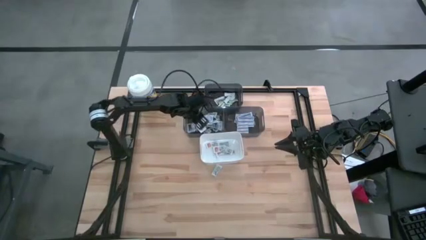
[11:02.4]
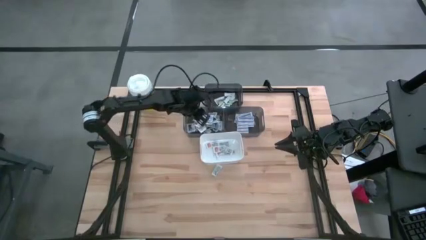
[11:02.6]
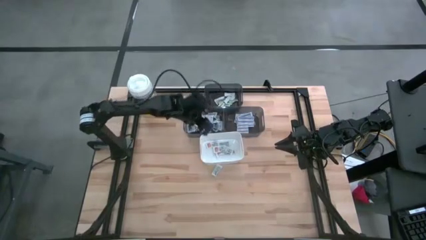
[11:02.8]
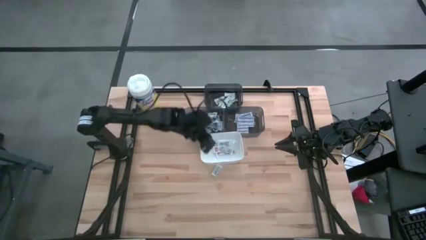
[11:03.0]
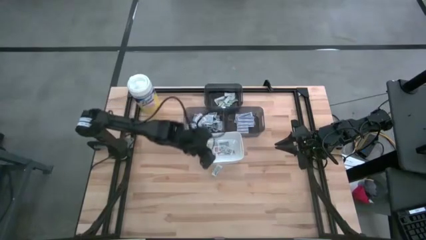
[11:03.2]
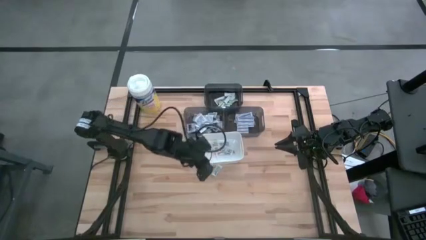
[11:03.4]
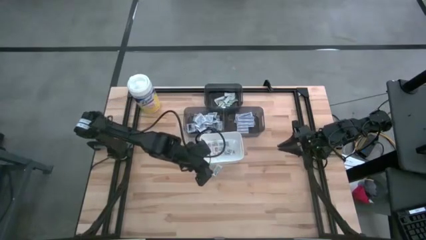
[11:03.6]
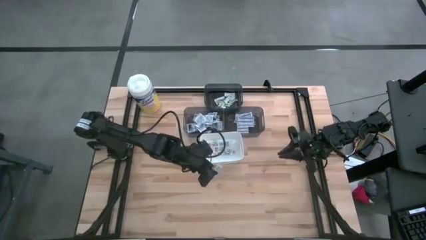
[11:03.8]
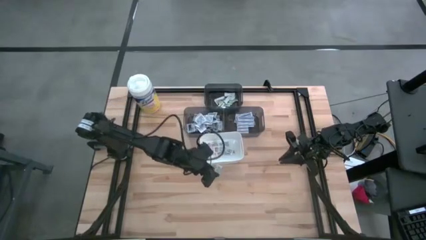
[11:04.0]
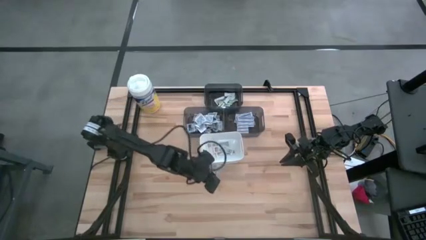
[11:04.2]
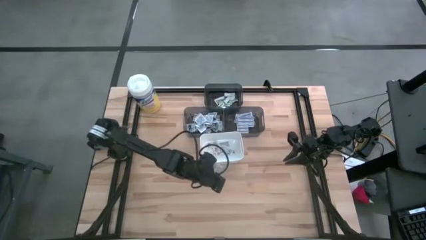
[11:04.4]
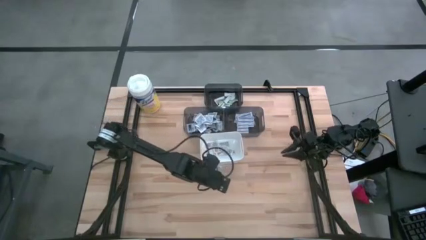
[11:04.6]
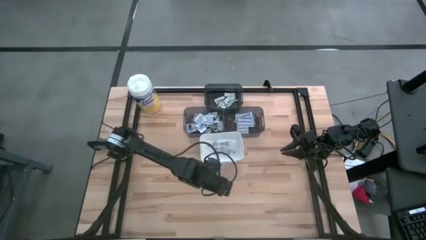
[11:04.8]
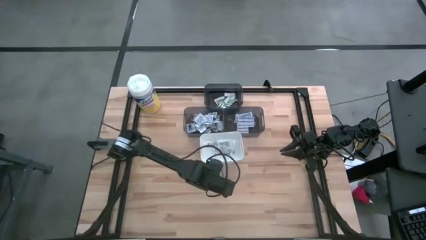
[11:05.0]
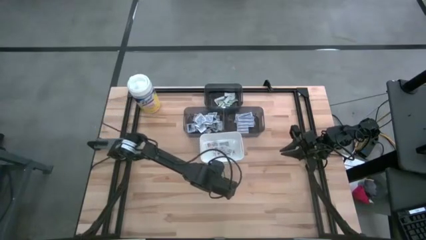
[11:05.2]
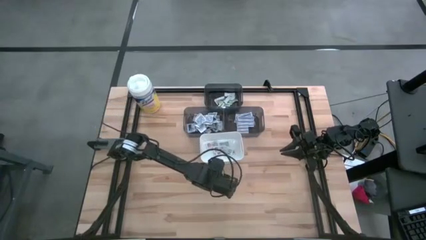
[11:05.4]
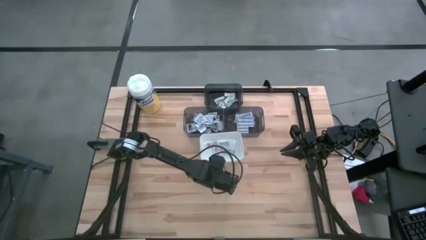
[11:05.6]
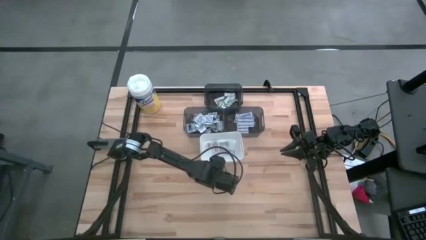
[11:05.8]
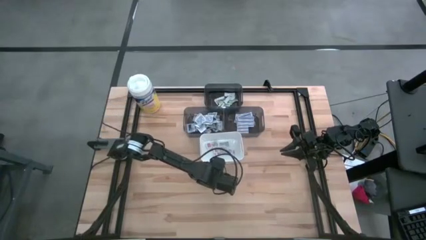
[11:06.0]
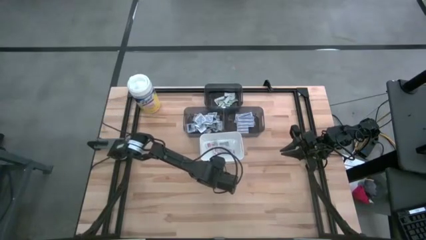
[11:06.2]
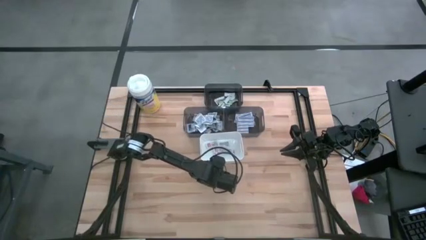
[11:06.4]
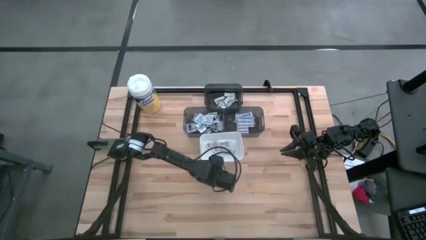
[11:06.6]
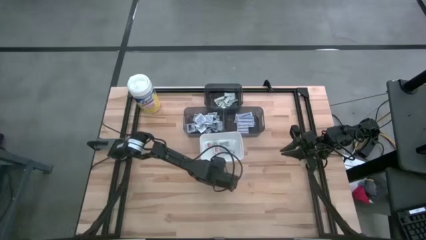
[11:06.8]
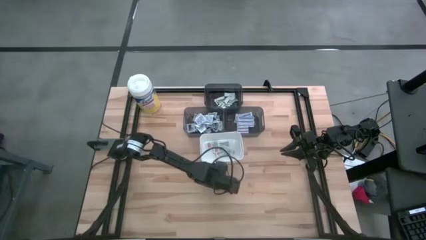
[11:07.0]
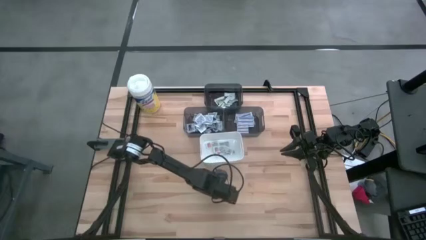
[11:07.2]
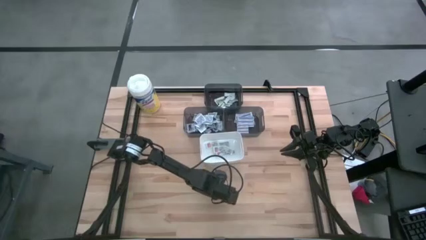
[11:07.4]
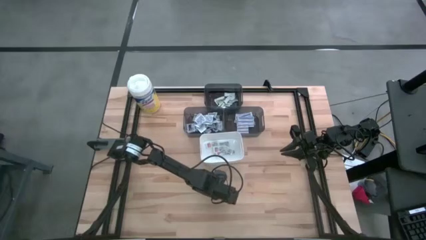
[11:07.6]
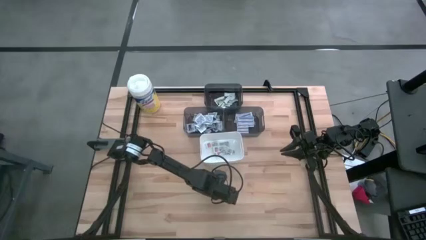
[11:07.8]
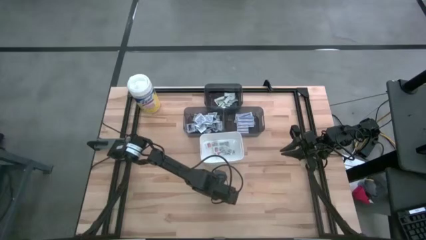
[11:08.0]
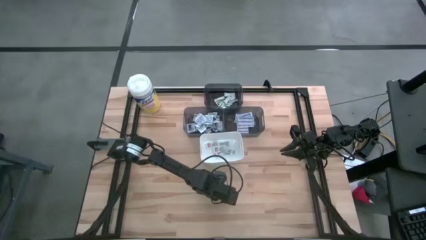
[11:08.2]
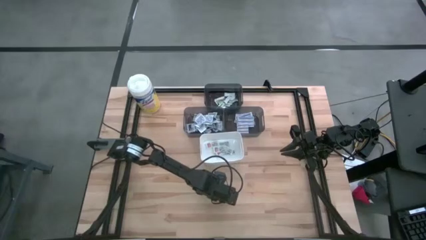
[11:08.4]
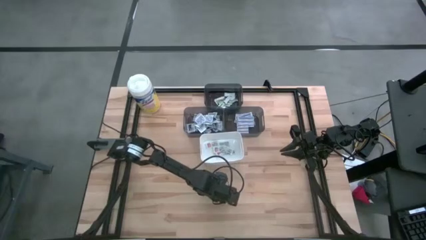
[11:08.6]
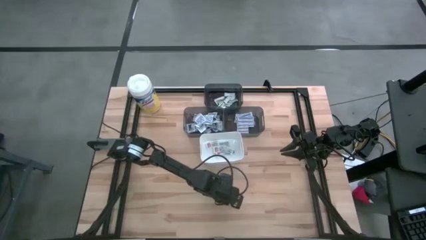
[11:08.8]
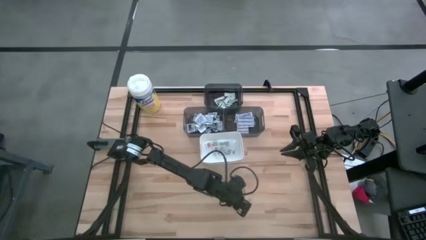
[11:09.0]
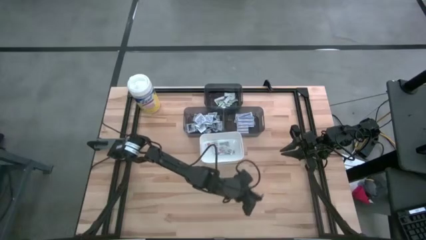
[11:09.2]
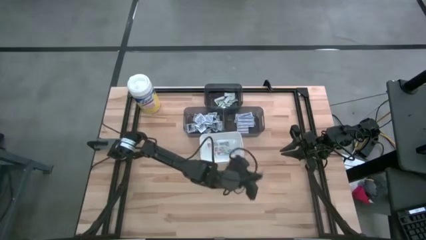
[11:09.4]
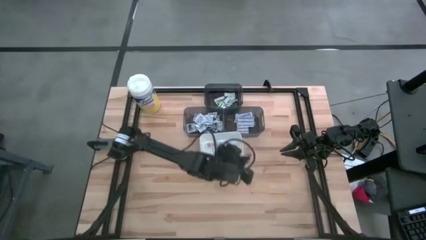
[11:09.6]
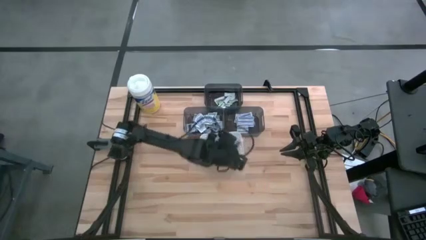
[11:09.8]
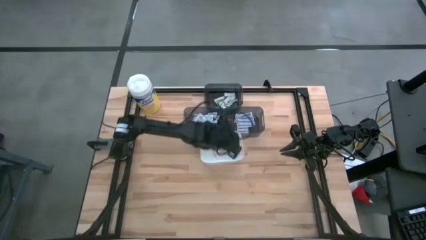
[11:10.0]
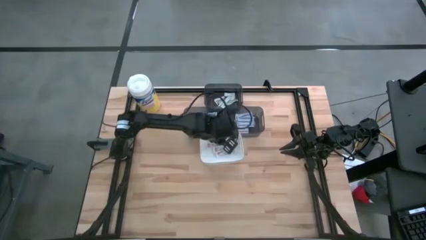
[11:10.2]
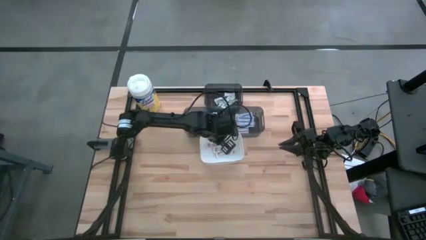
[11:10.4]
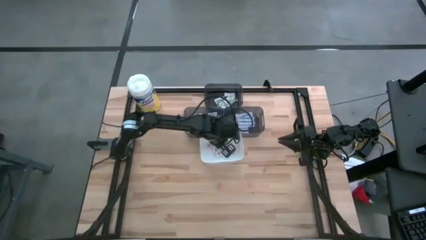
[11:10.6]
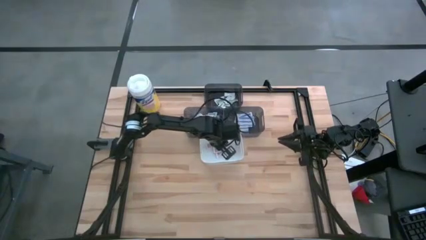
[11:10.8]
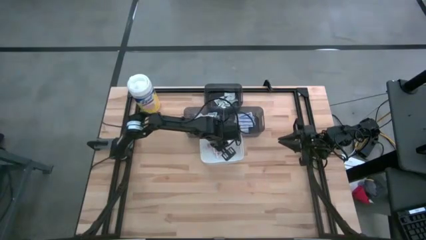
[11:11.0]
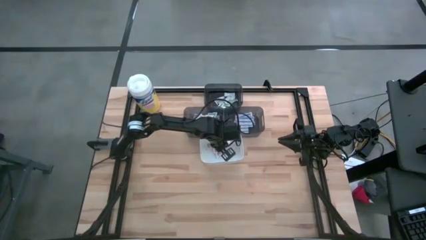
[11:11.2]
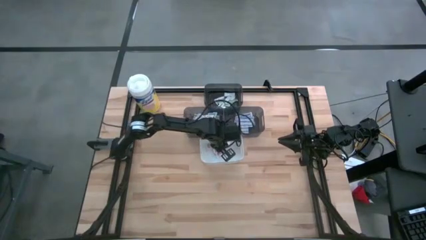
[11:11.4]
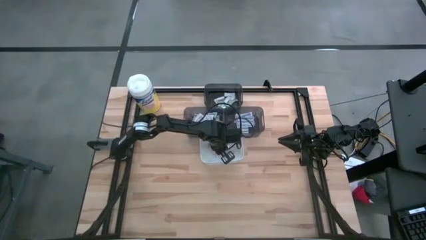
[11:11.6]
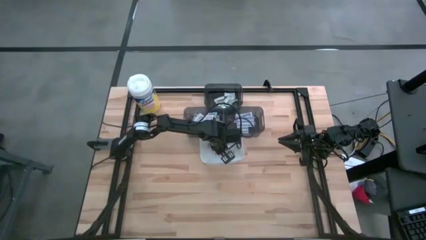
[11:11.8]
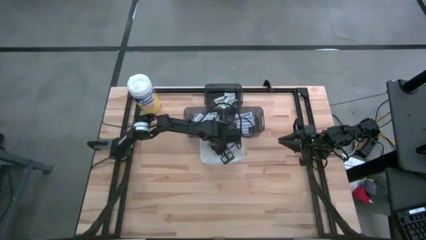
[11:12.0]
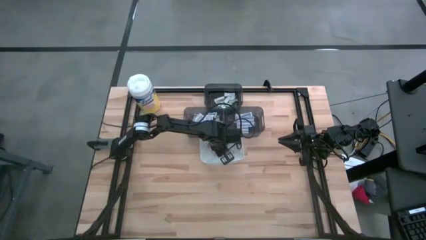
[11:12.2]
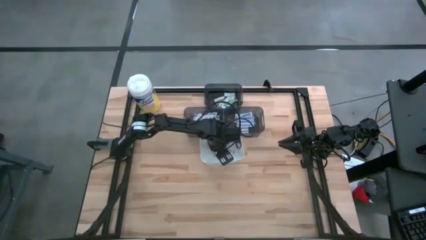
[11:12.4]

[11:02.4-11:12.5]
Task: Pick & Place First Aid Supplies
Put the ointment pack into the white bin

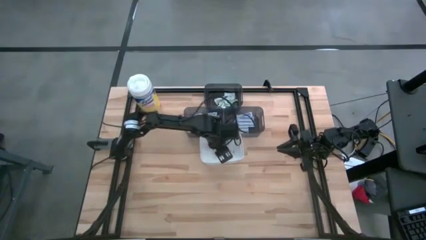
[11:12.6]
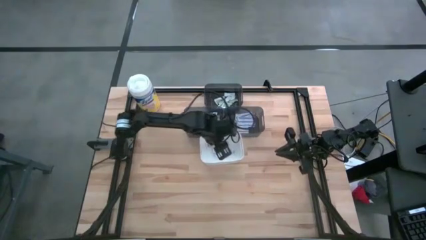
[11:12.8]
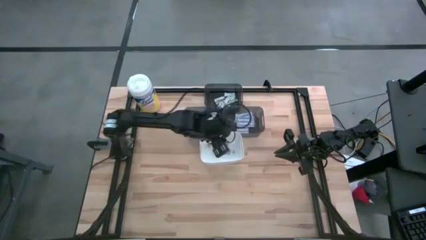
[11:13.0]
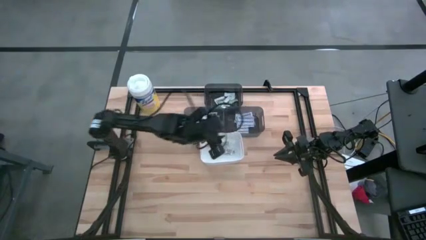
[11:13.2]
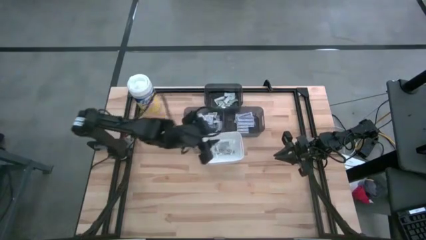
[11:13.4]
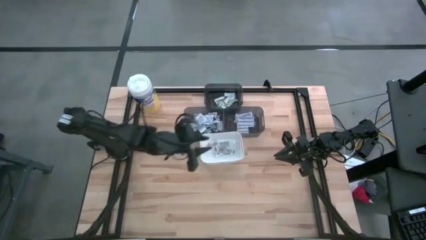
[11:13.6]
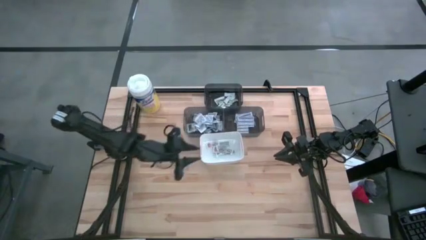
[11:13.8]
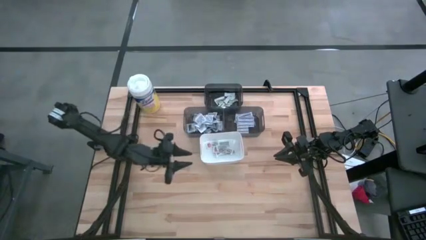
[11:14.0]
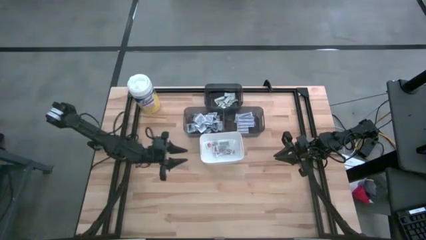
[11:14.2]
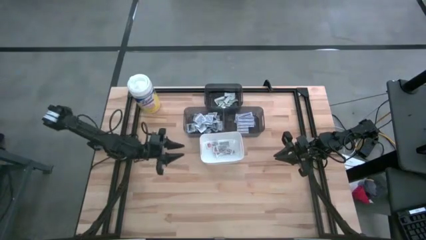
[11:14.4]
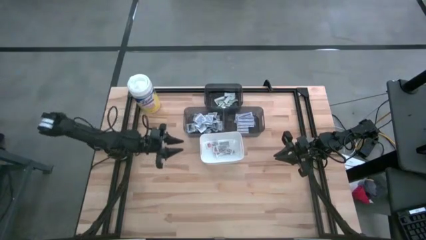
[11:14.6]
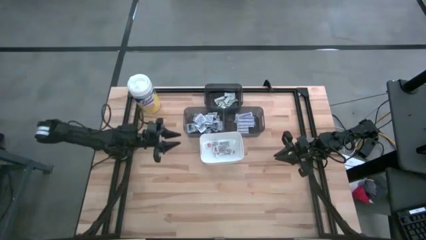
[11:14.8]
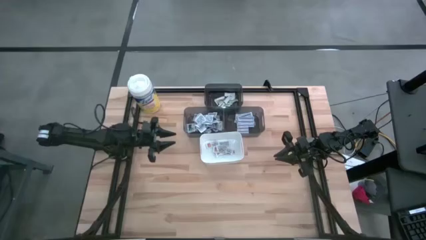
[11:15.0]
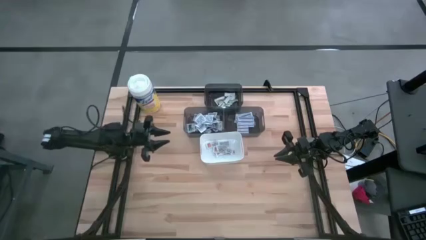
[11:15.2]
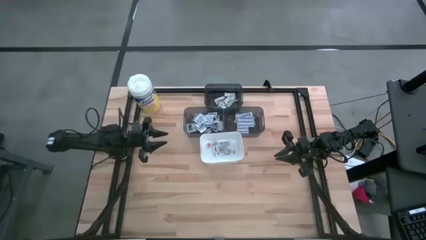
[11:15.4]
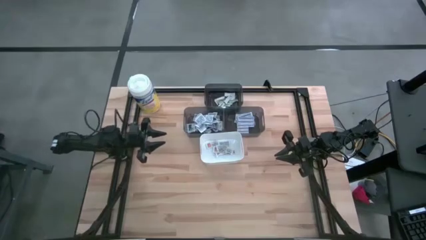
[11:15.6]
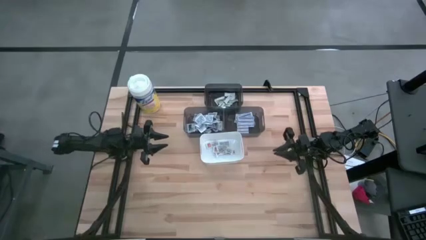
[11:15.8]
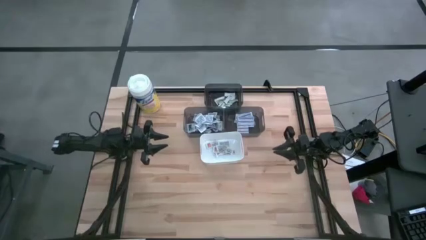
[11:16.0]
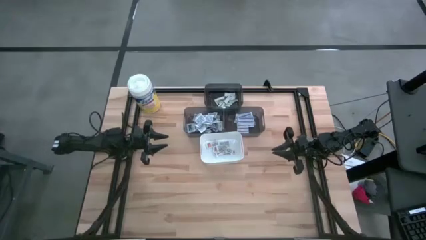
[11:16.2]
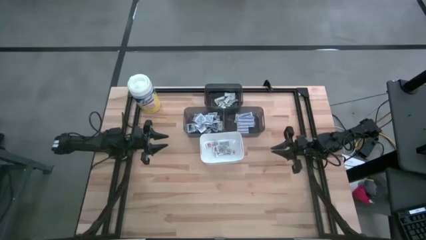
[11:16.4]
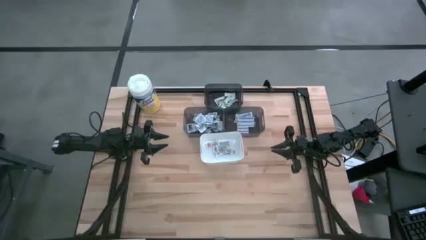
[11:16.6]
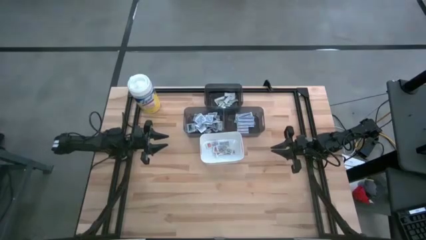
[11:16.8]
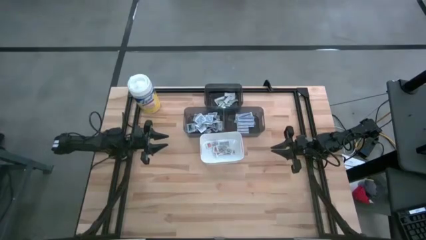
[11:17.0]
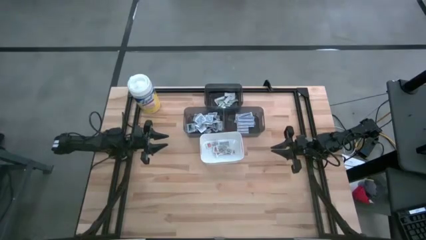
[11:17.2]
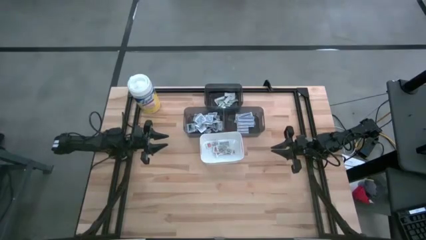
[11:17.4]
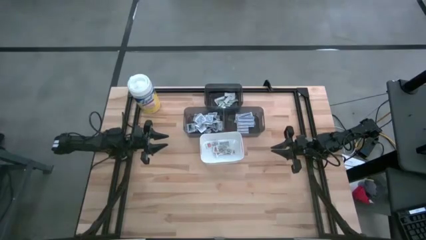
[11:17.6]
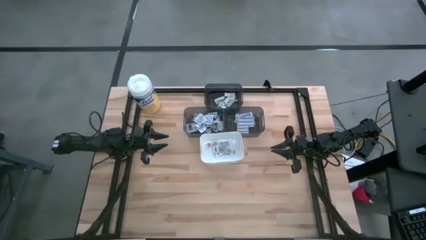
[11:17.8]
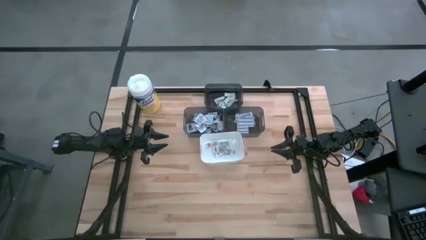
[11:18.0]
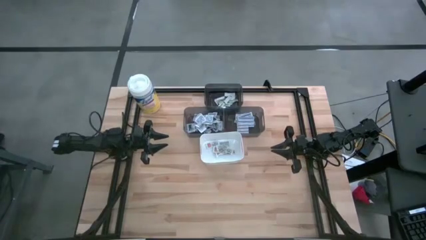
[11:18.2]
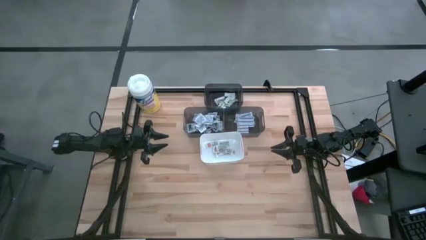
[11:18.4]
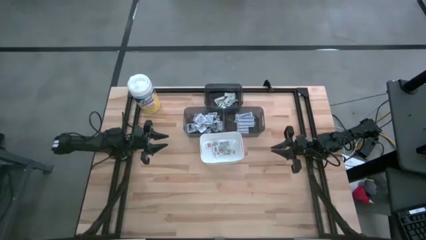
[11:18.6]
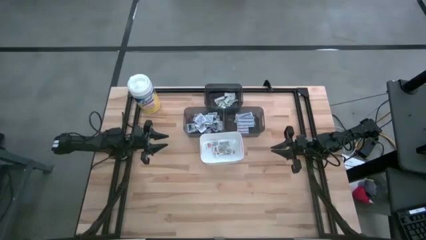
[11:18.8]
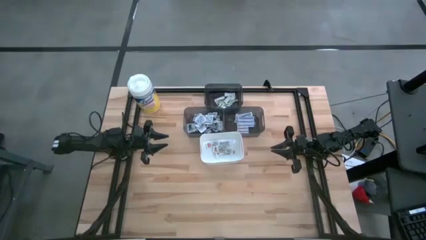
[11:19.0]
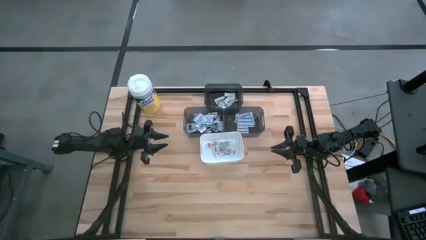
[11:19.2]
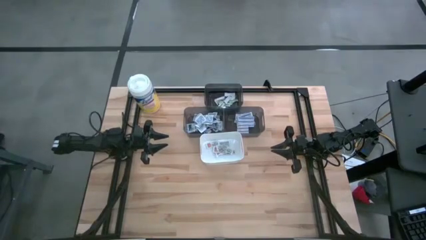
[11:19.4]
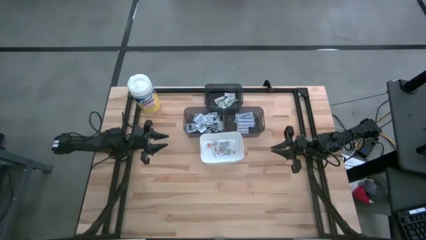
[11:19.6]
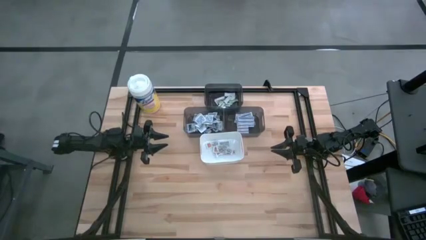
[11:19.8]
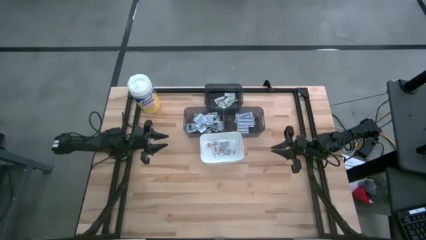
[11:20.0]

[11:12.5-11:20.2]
Return to Home Position
